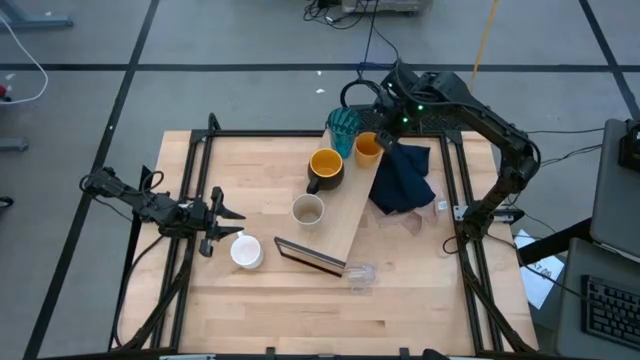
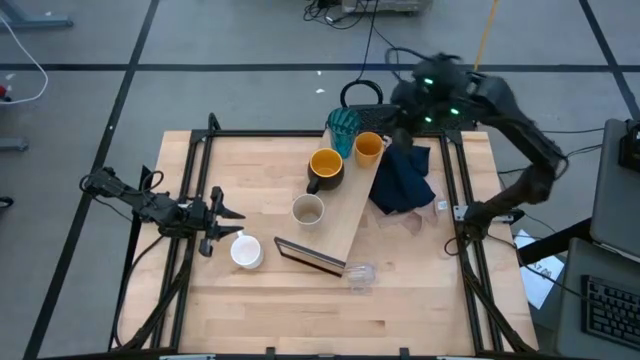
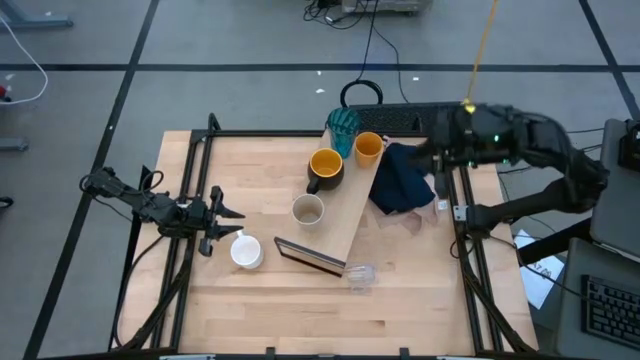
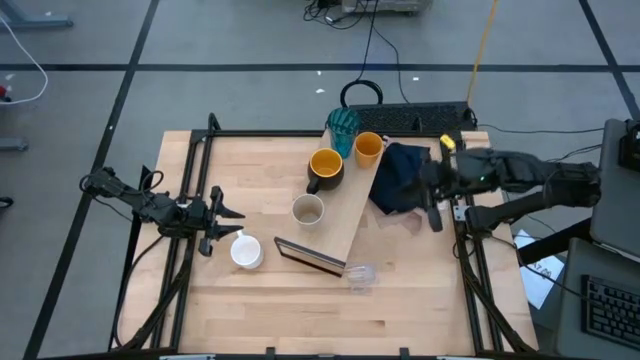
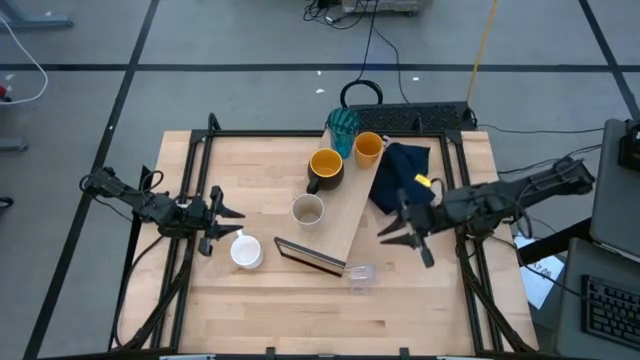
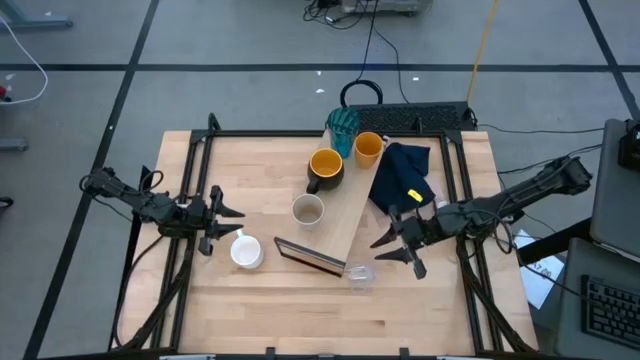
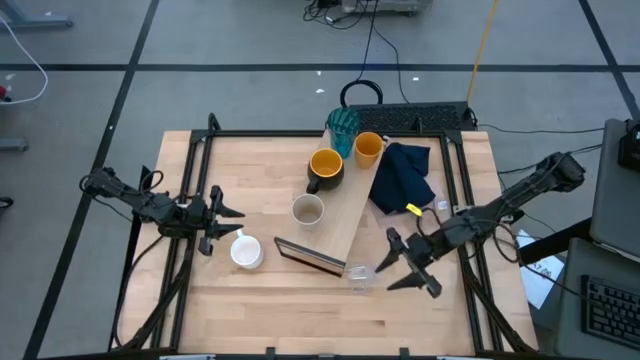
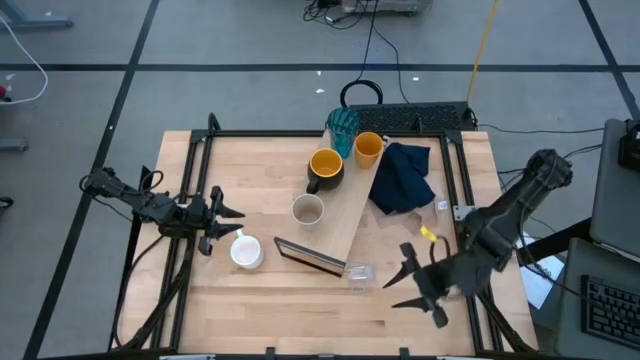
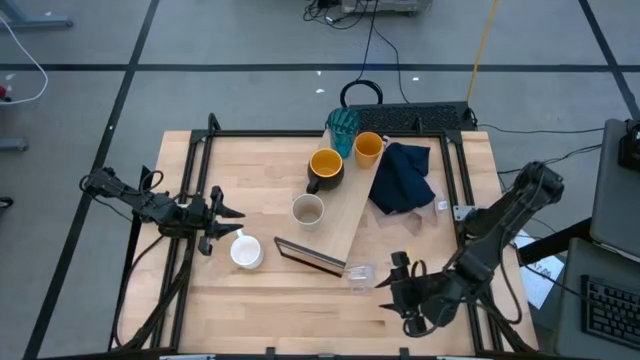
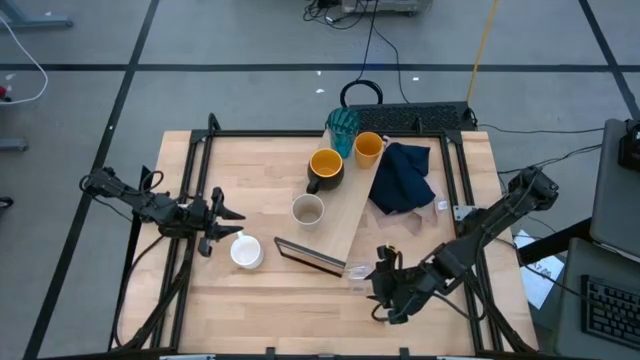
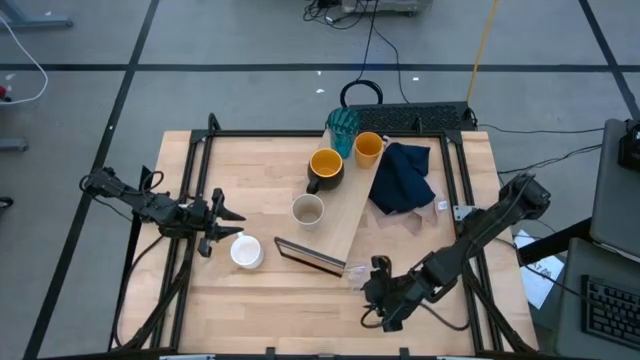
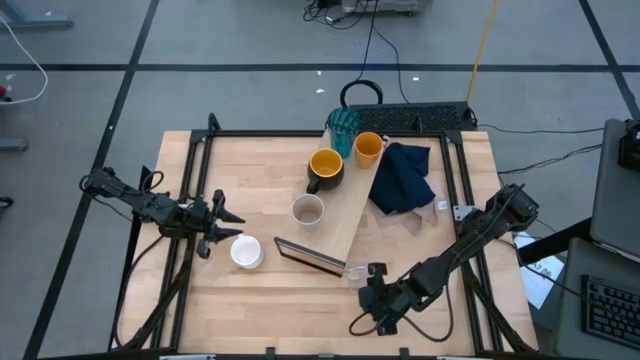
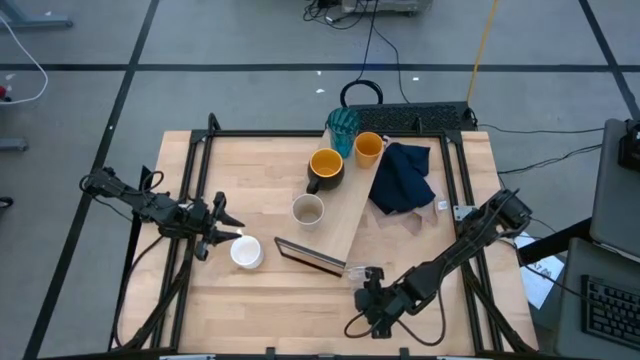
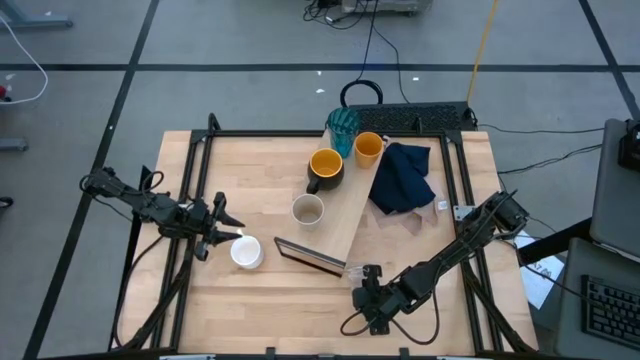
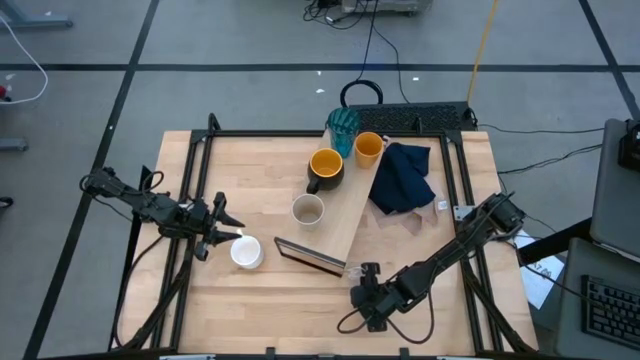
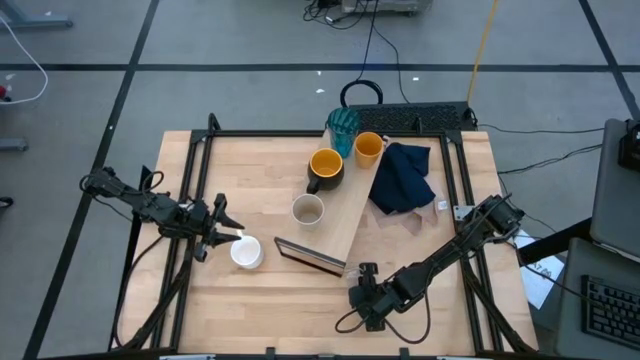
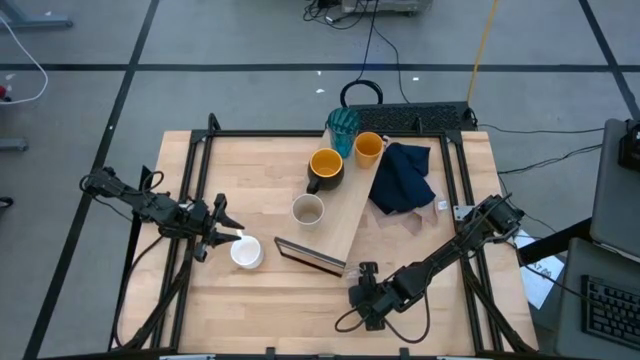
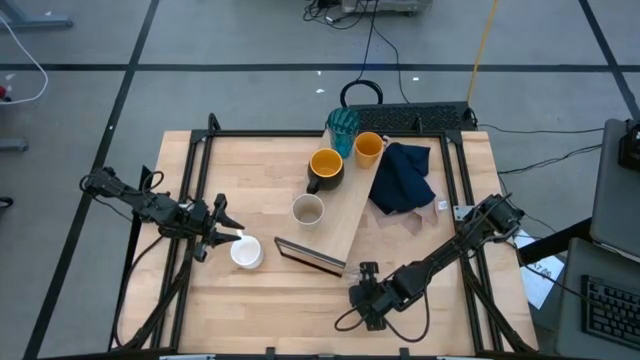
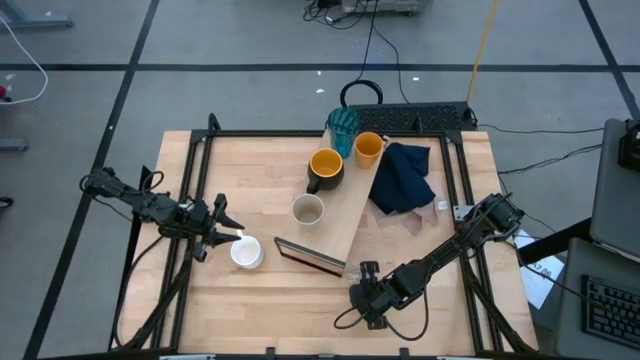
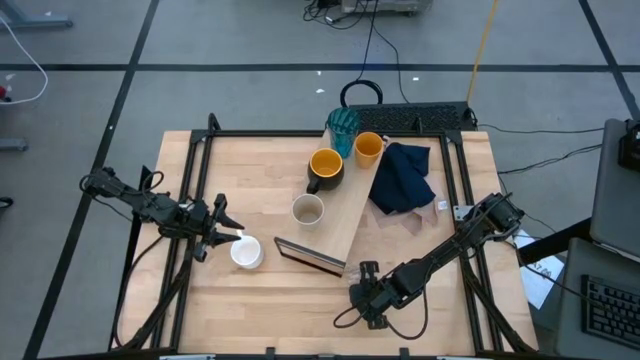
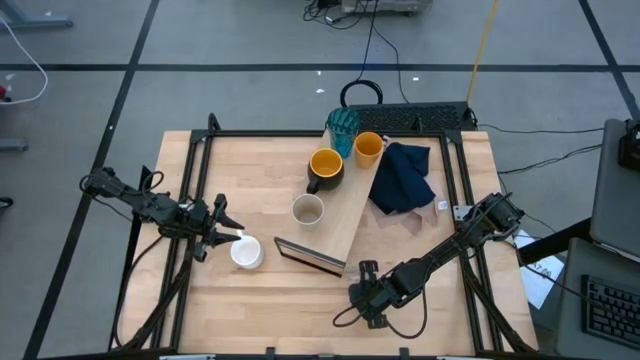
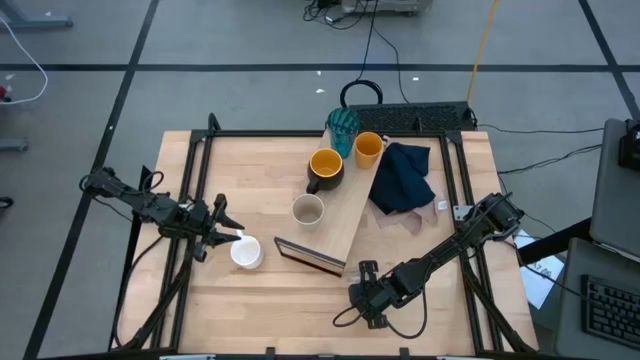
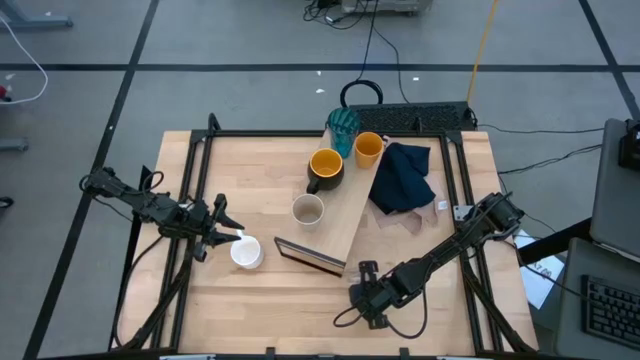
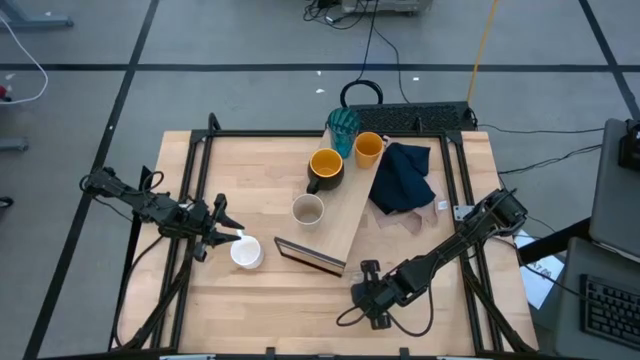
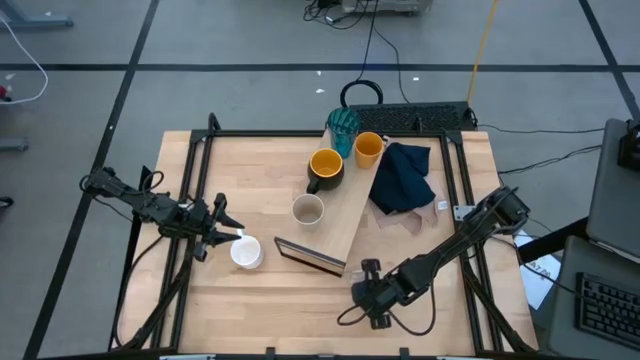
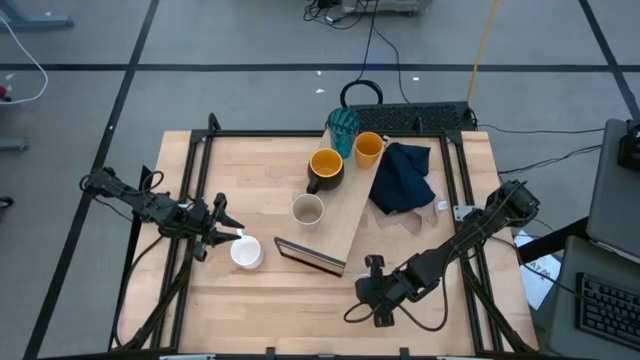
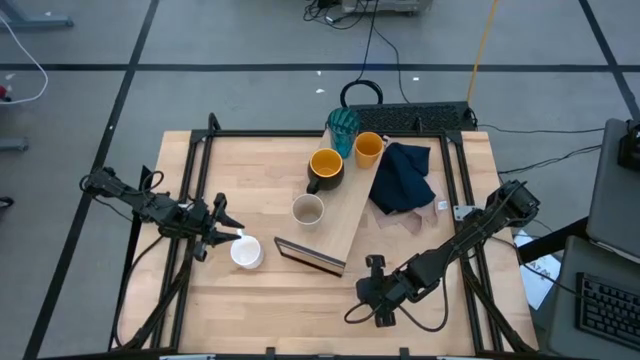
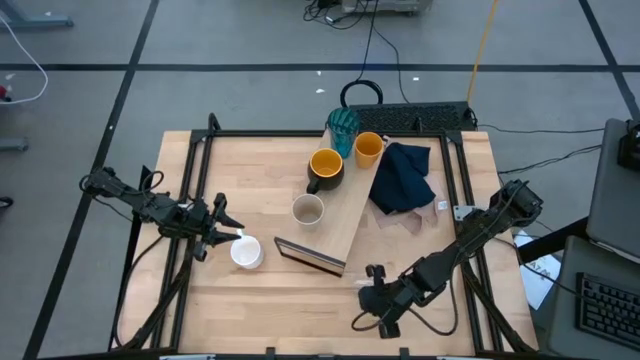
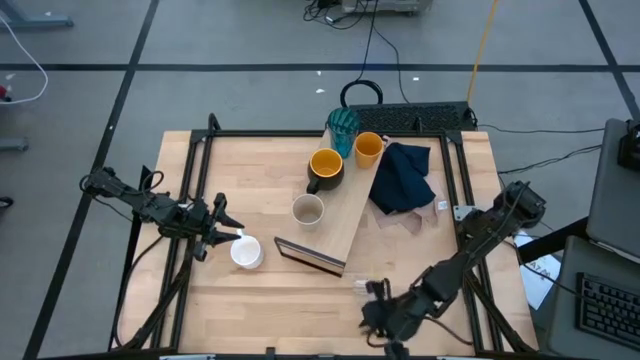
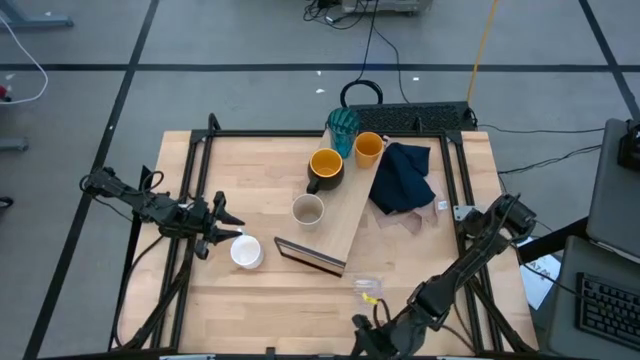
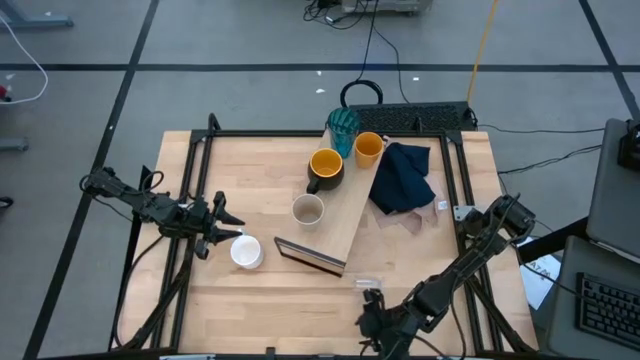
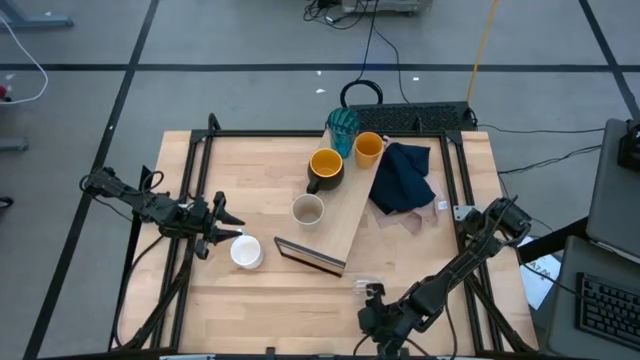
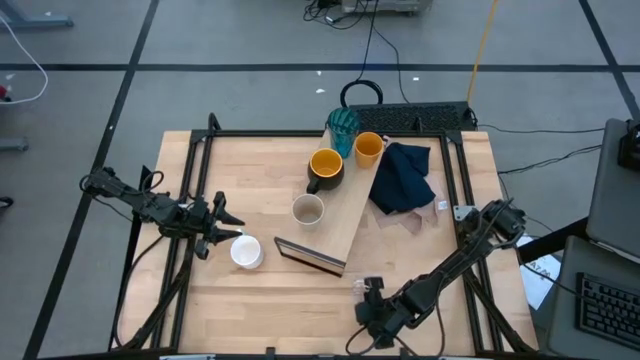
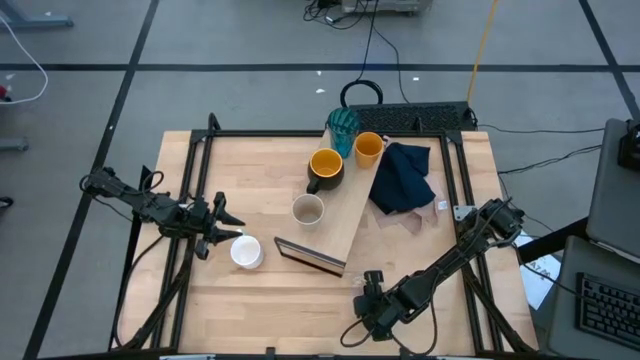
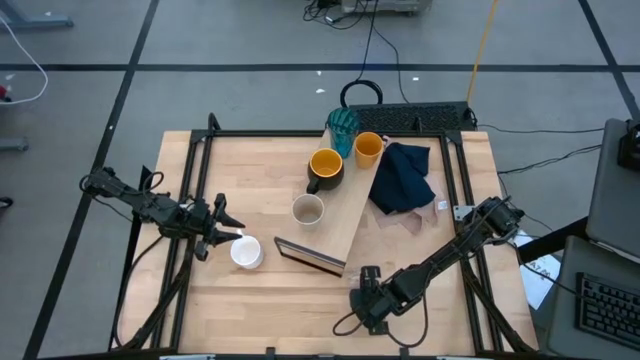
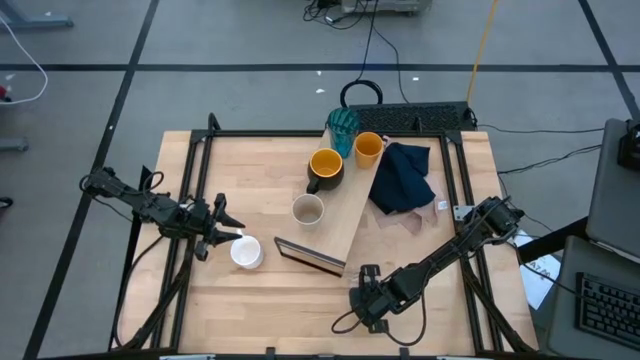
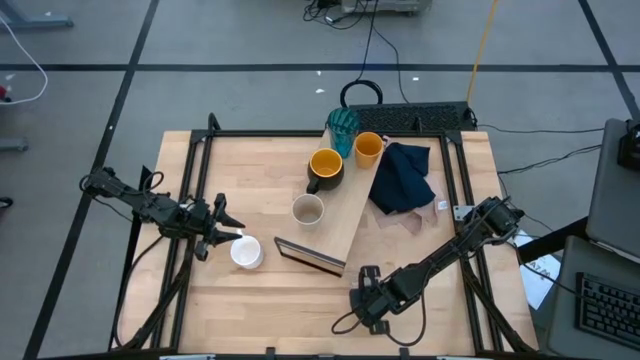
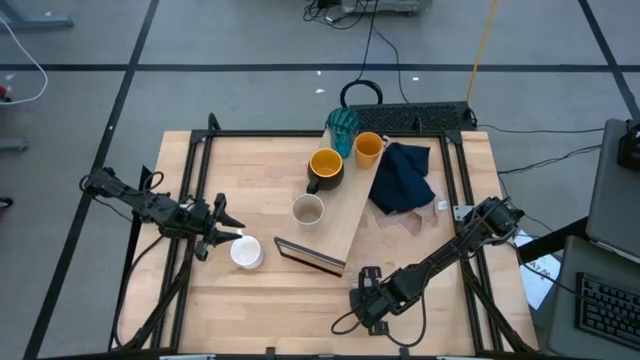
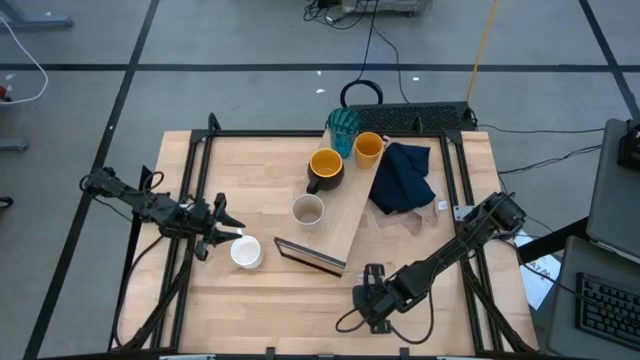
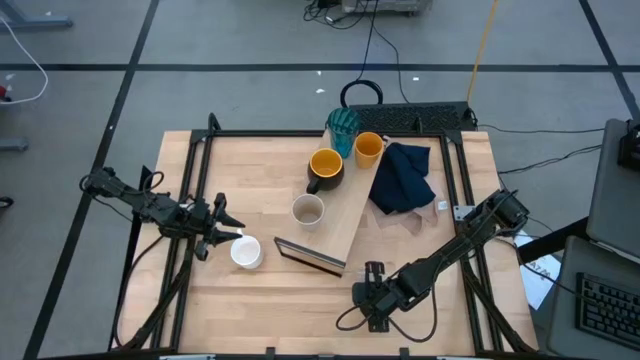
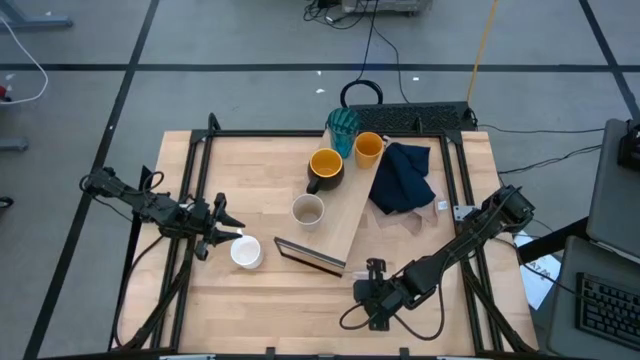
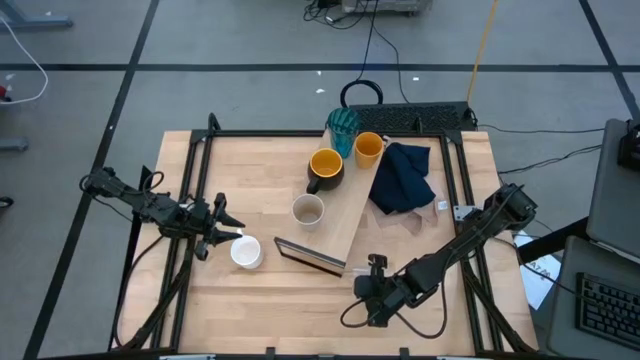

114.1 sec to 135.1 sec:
Task: Stack small to large cups/mugs on shelf
Put the transparent mug on the shelf

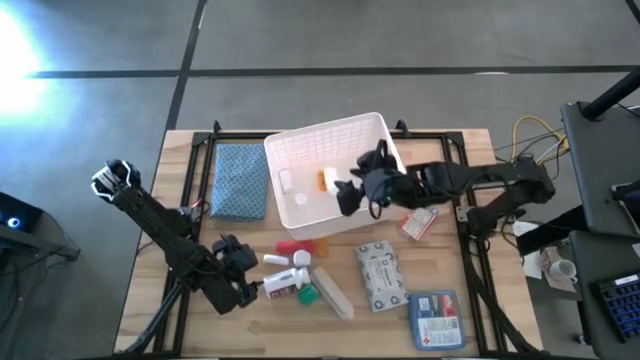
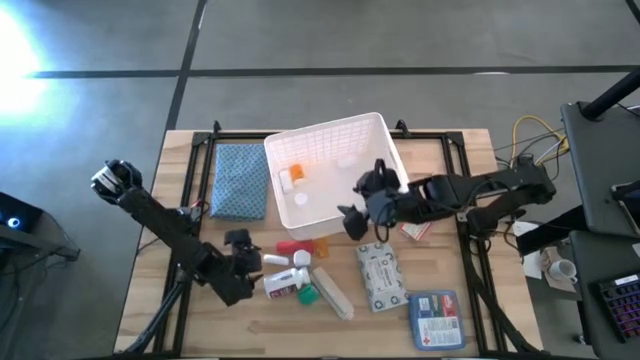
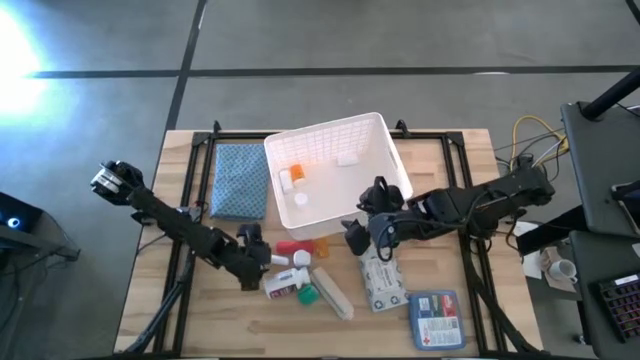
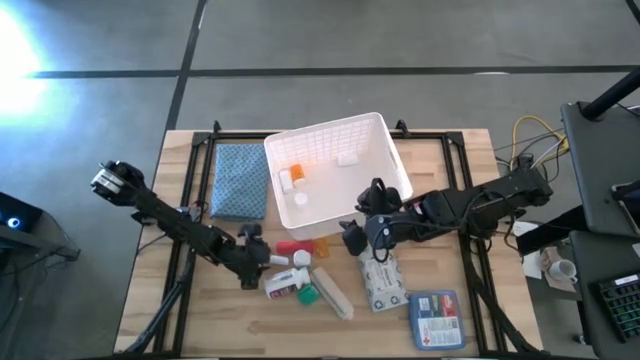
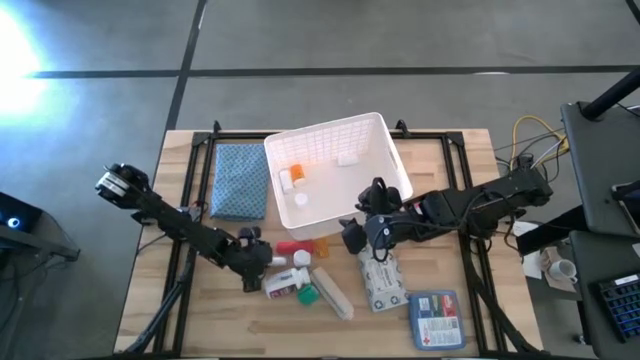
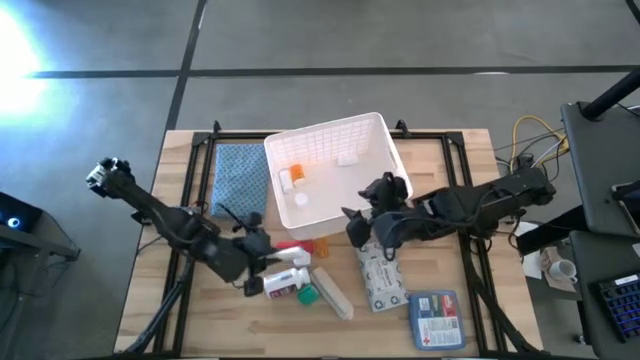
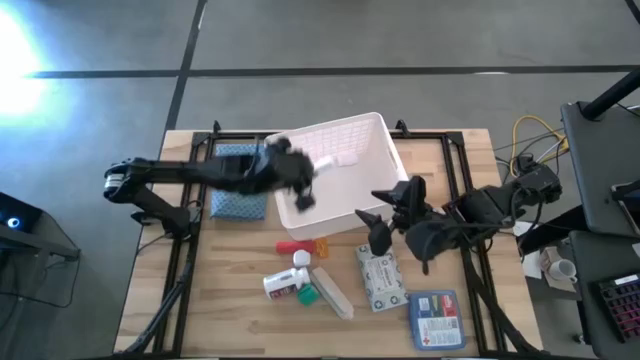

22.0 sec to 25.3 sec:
Task: Pick & place medical supplies in basket/bin
Put the rolled gauze into the white bin
